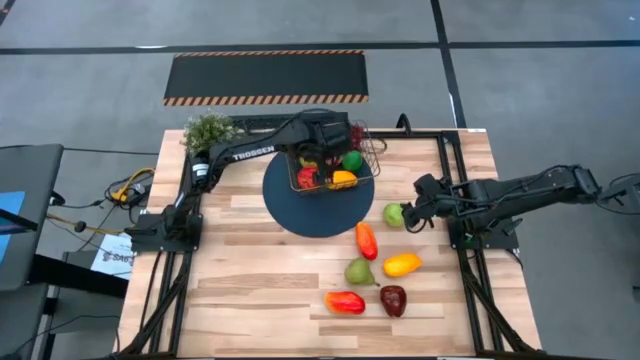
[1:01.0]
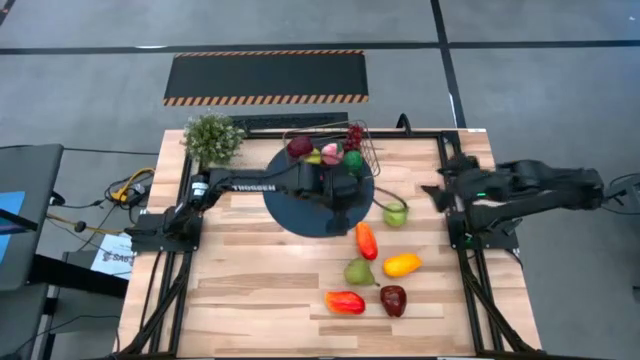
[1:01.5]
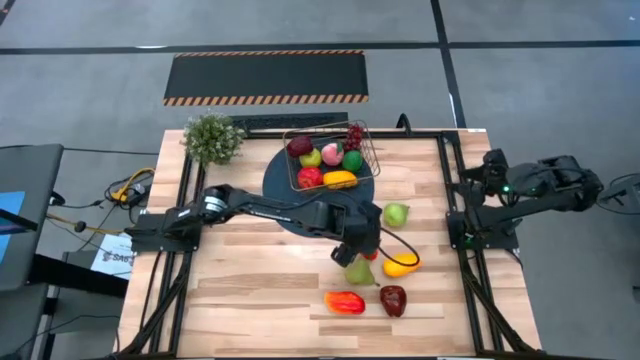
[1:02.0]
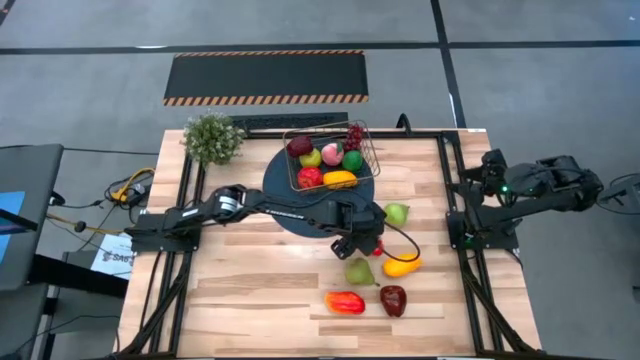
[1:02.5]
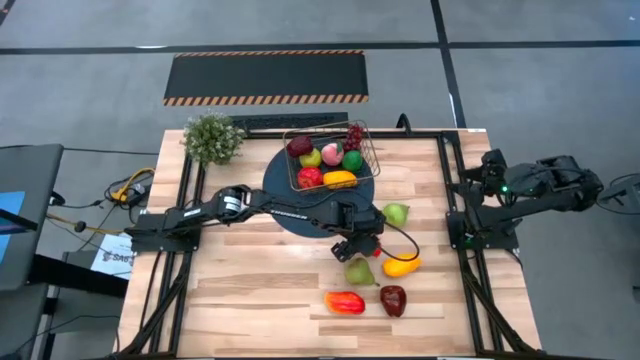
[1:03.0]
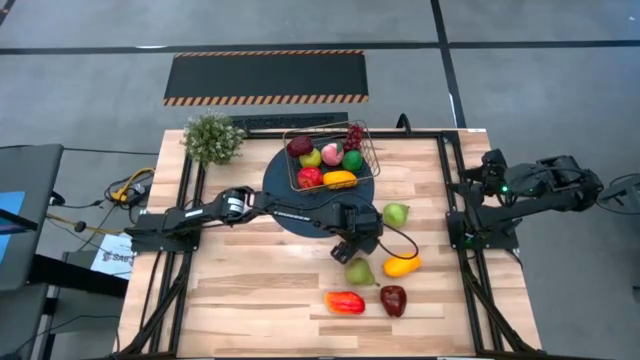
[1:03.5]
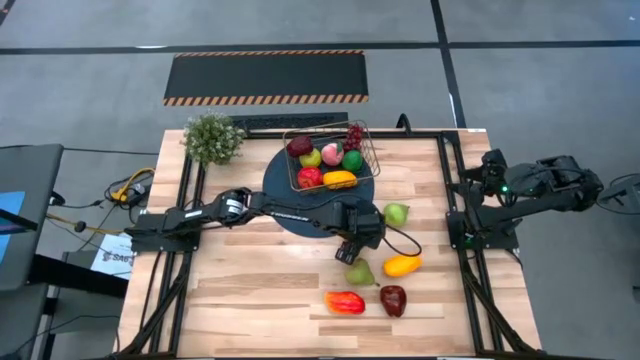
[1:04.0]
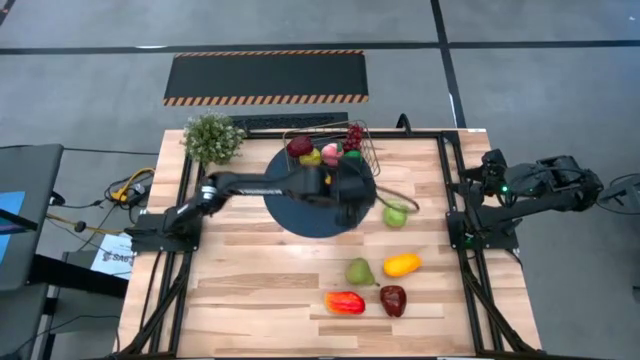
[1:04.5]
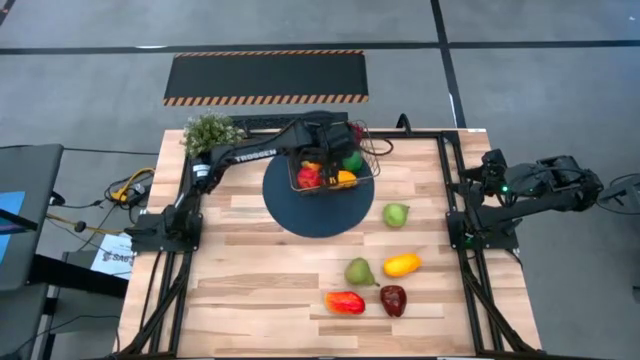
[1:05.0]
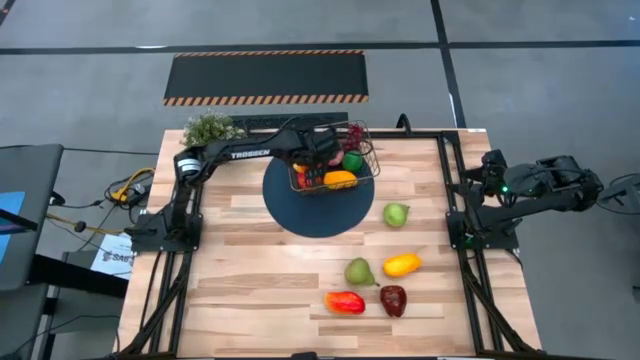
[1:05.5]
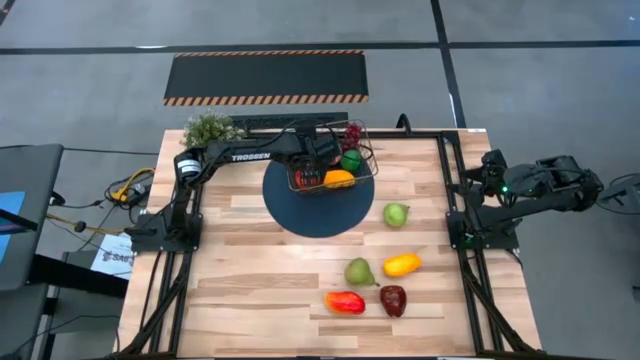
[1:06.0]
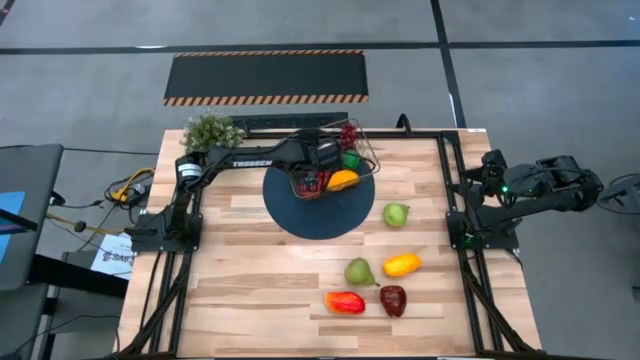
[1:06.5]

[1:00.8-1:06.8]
Task: Build produce basket
Put the top orange mango into the wire basket

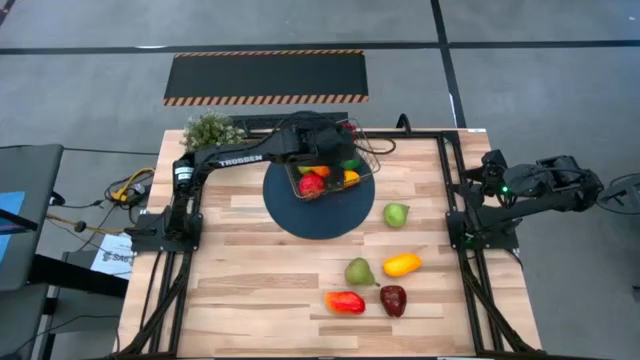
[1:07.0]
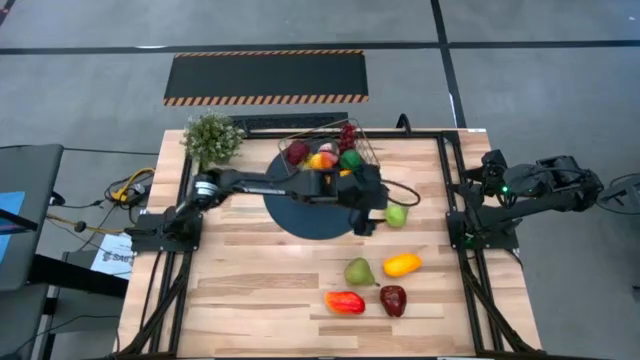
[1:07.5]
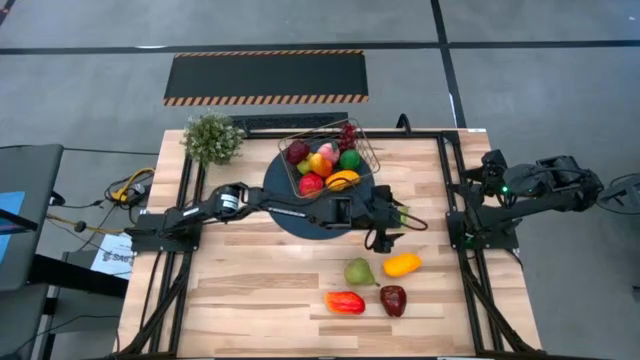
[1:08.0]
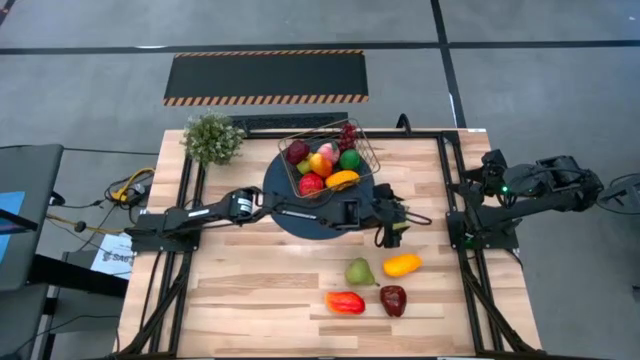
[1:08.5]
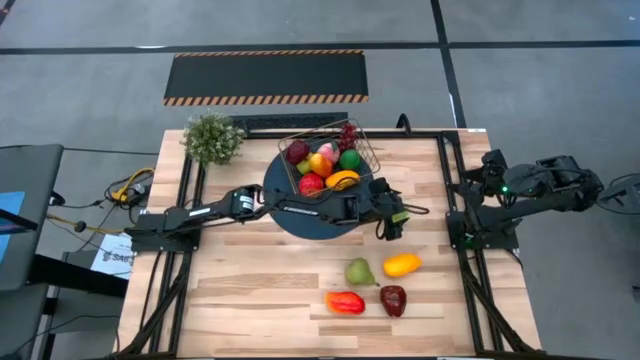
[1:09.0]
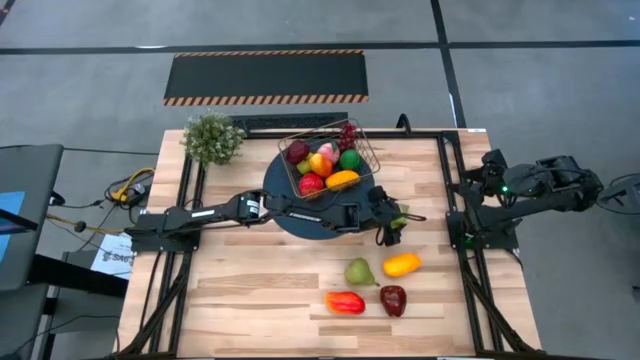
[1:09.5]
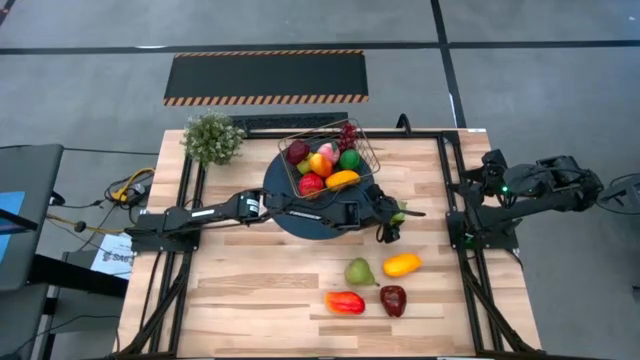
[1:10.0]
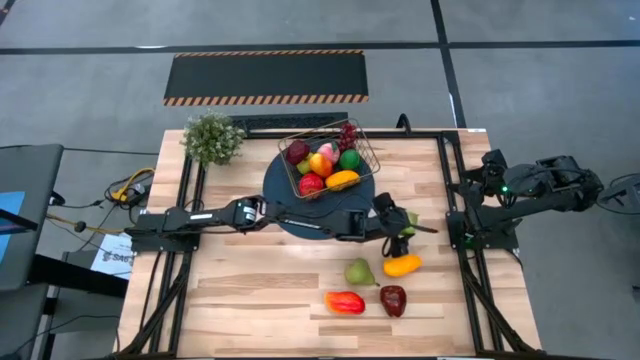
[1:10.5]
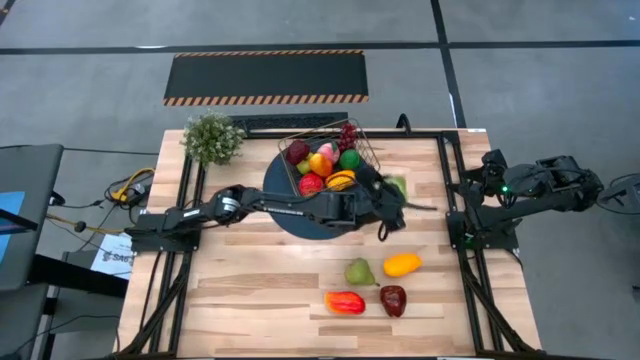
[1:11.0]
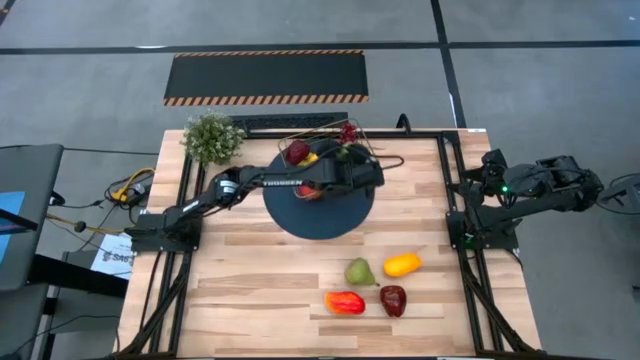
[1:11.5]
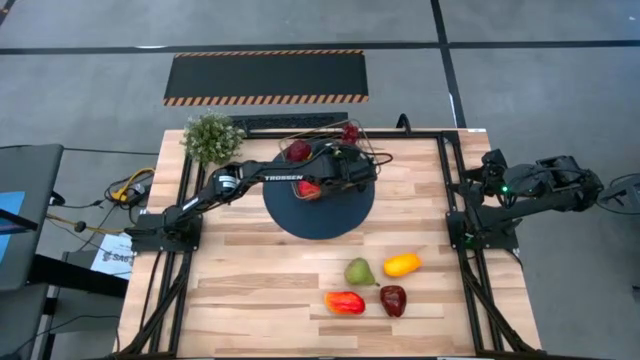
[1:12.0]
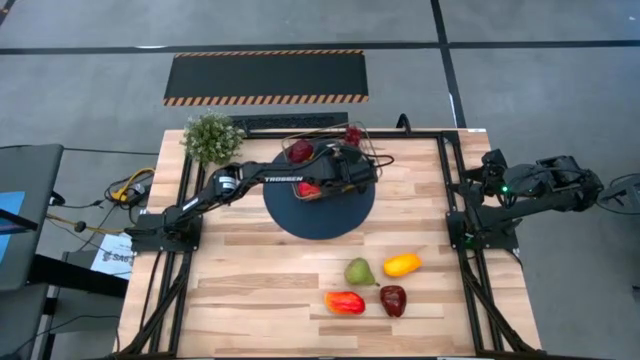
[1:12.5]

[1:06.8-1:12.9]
Put the top pear into the wire basket

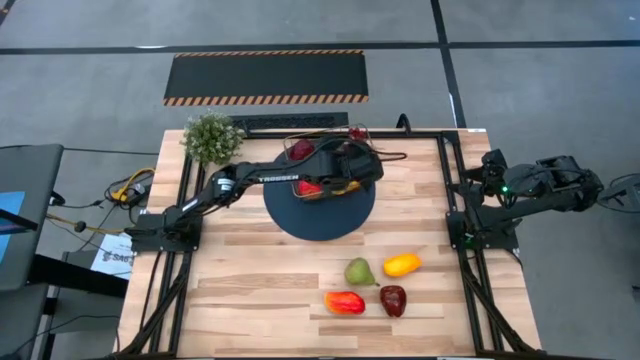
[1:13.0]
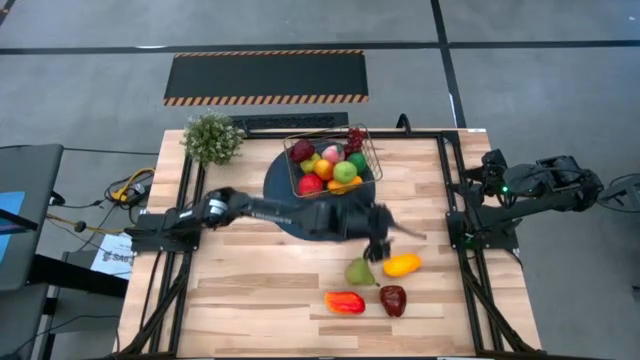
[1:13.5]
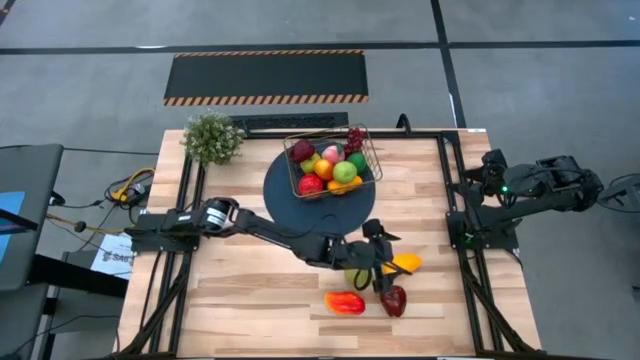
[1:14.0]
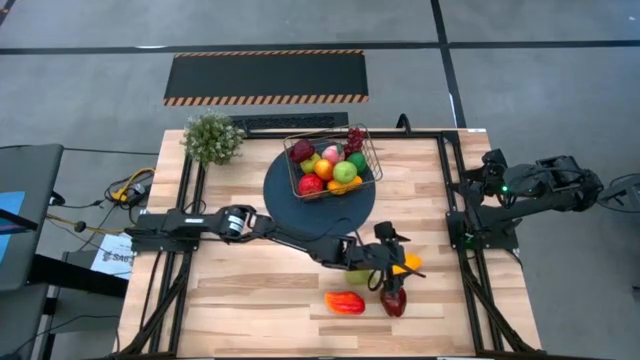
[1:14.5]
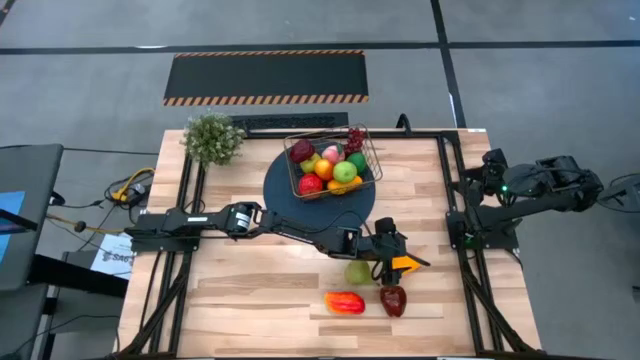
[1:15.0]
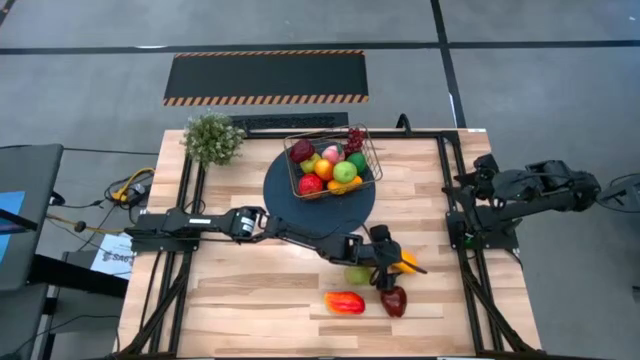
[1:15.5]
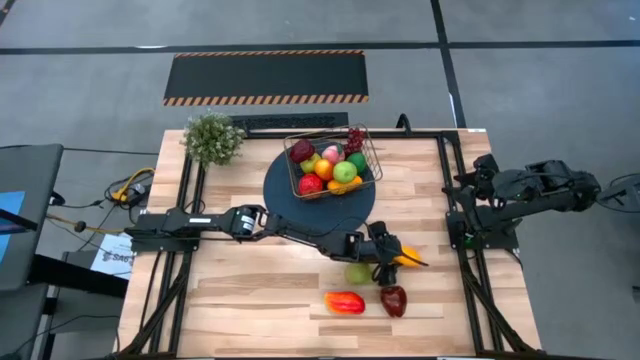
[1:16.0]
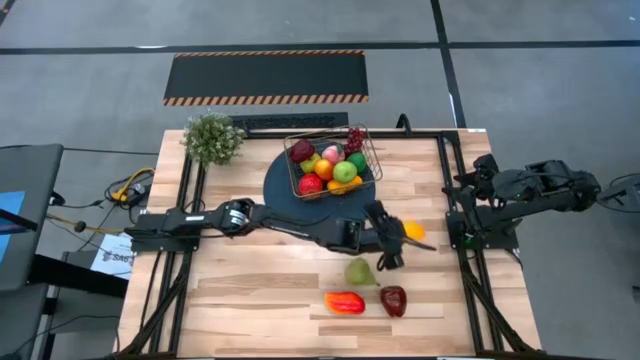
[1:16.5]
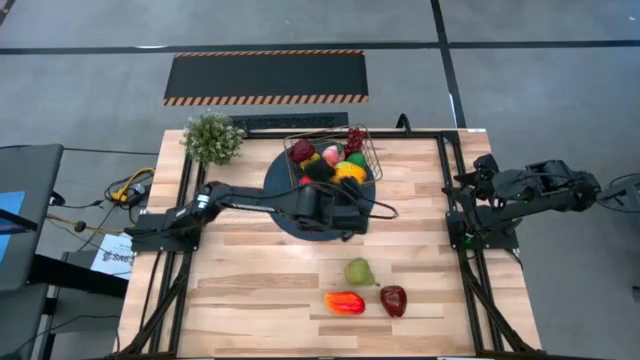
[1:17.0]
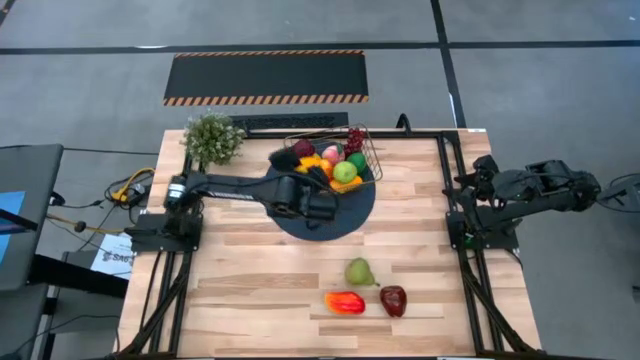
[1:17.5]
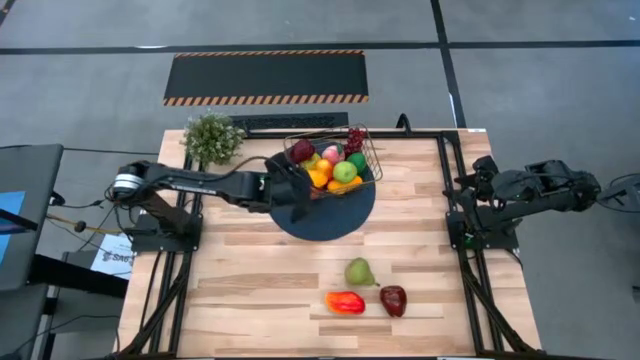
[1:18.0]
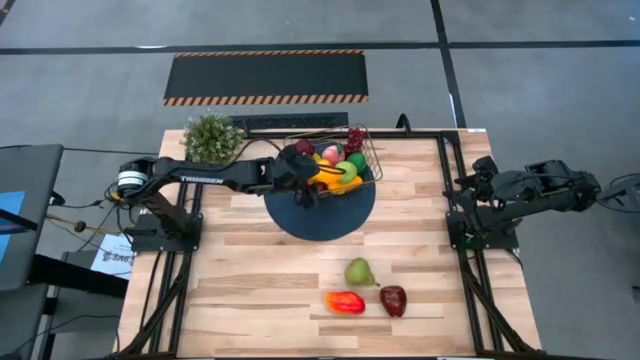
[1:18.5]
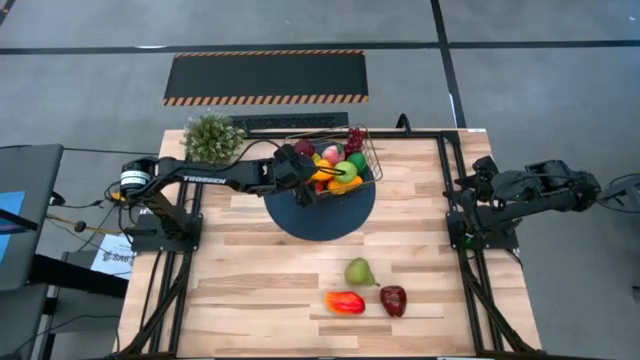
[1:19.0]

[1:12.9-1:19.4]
Put the yellow mango into the wire basket

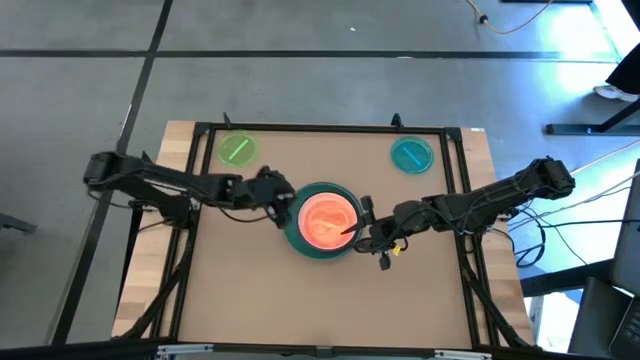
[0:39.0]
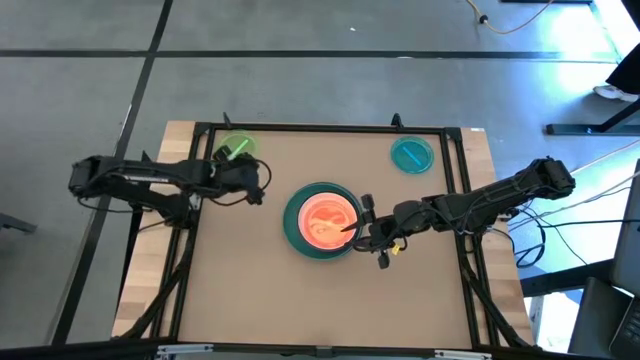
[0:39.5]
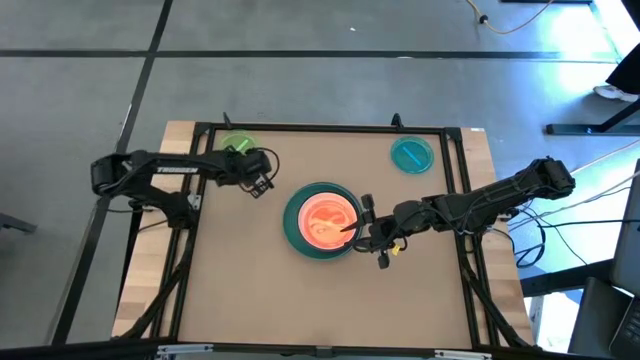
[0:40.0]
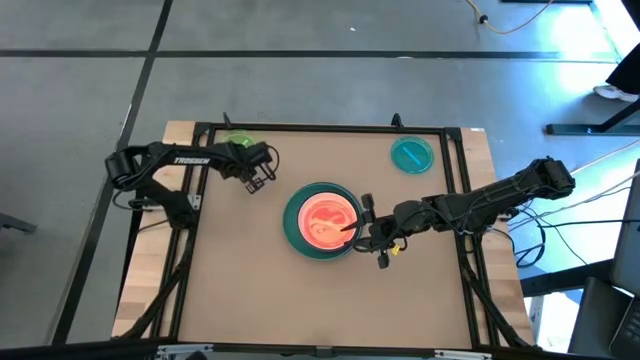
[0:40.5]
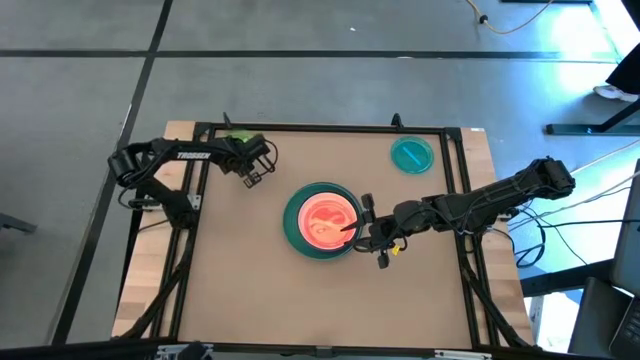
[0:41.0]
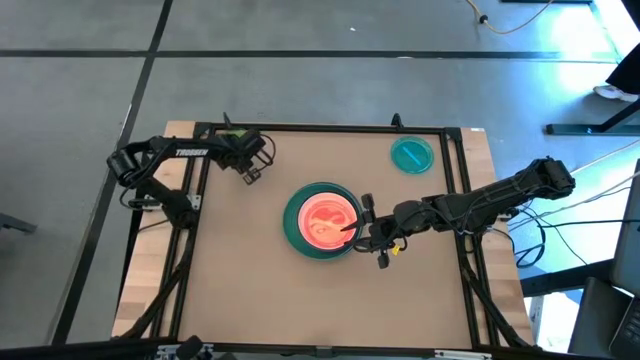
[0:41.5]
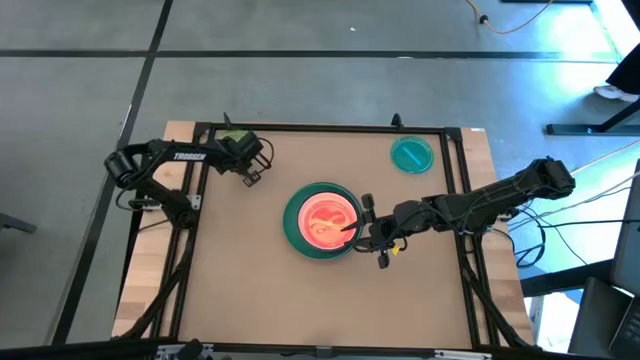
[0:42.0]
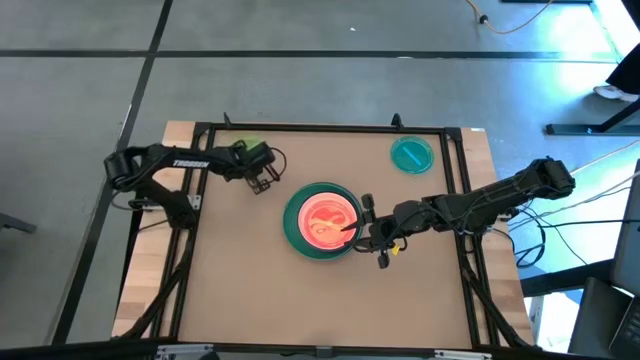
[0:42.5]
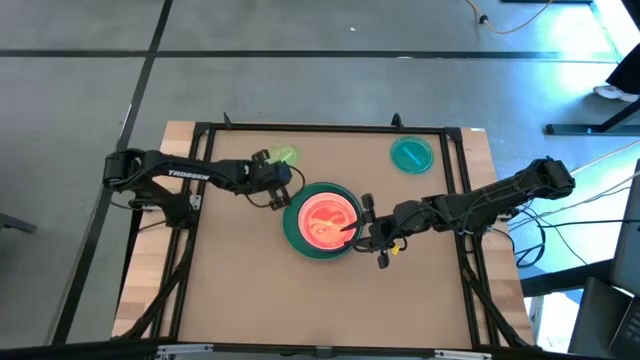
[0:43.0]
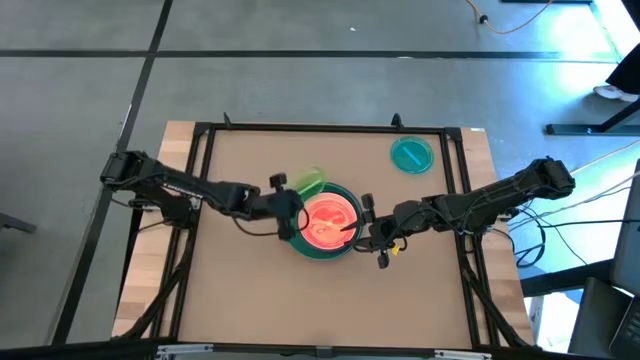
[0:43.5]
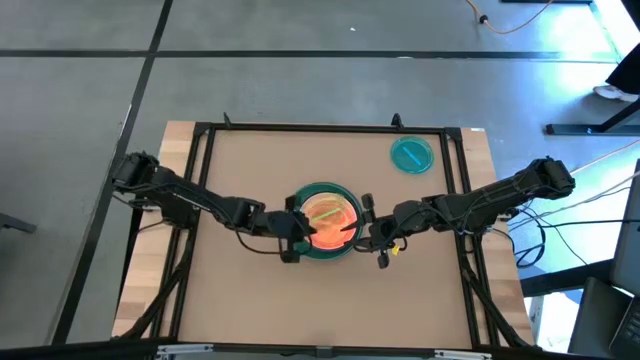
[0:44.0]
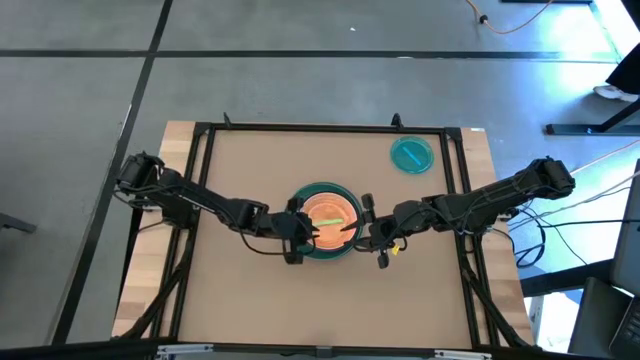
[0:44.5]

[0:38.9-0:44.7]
Task: Stack plastic plates
Stack the transparent green plate on top of the transparent orange plate
